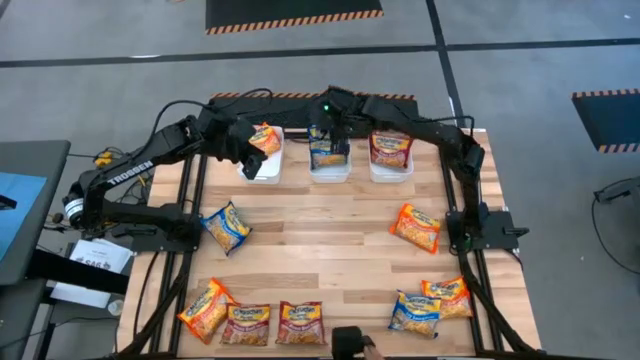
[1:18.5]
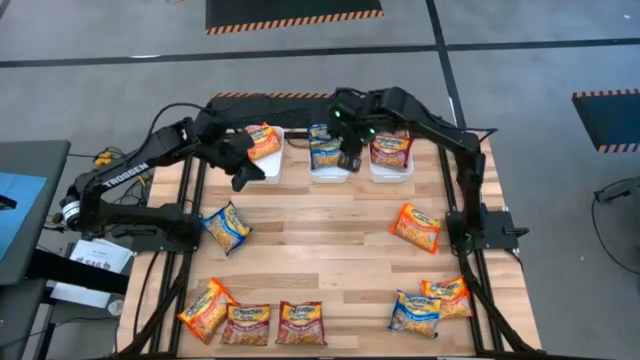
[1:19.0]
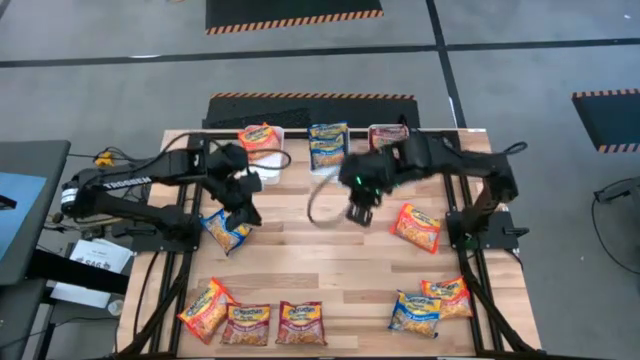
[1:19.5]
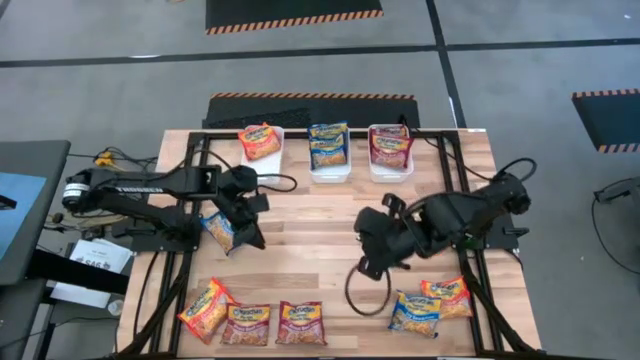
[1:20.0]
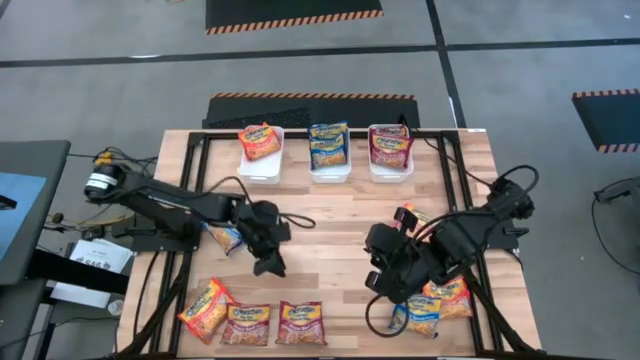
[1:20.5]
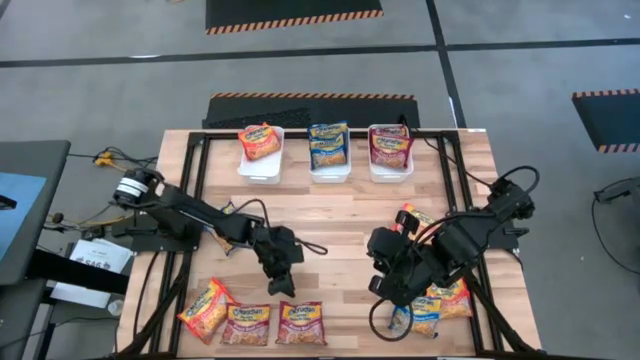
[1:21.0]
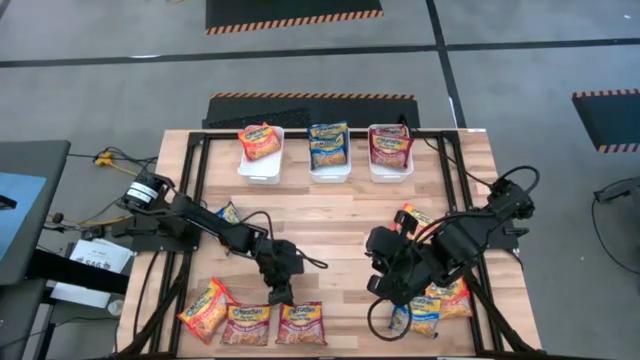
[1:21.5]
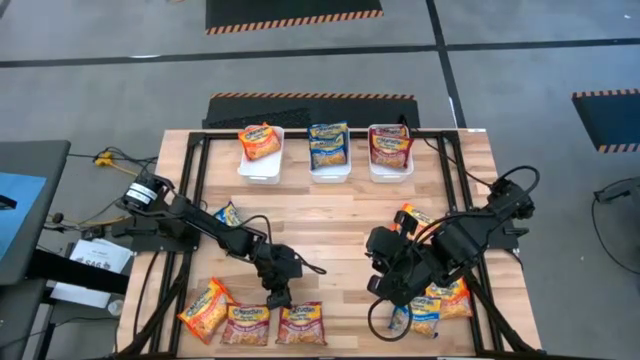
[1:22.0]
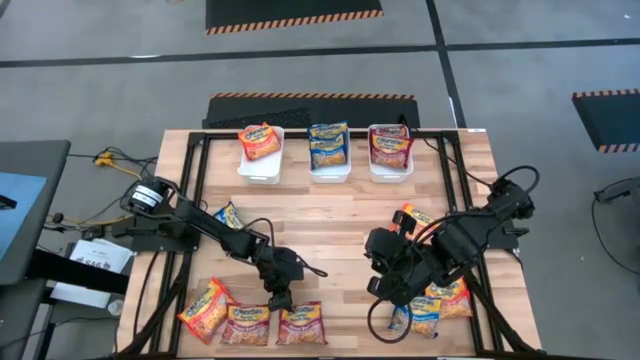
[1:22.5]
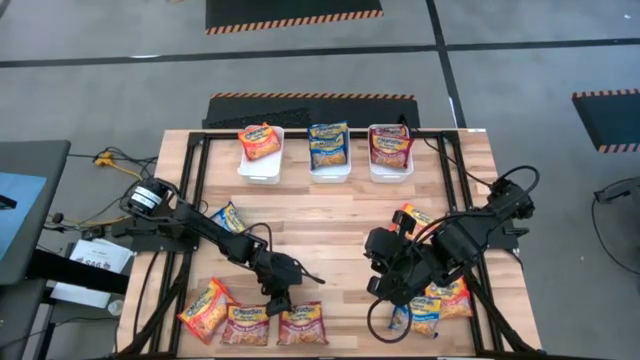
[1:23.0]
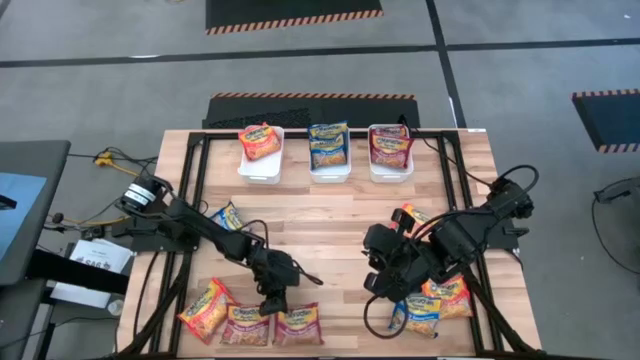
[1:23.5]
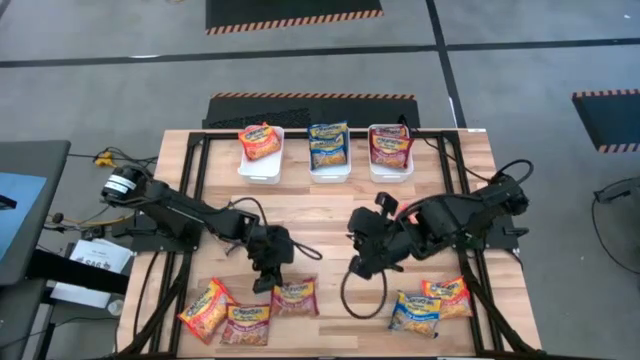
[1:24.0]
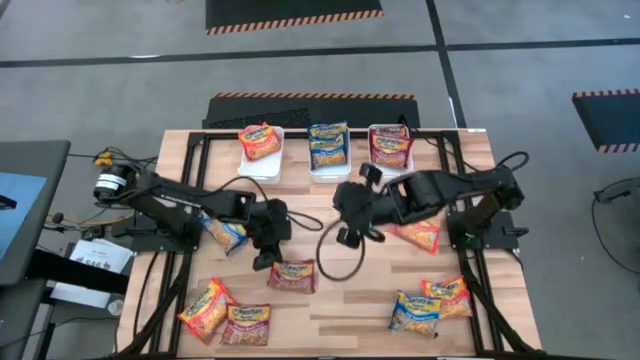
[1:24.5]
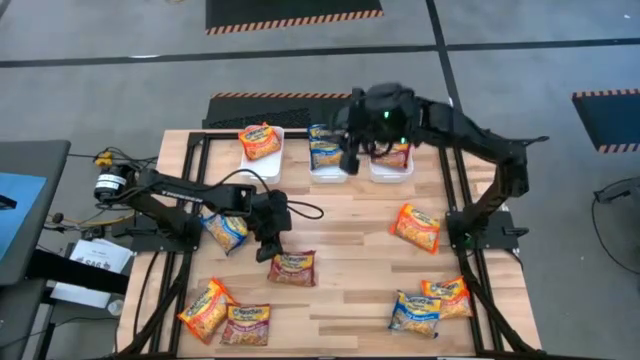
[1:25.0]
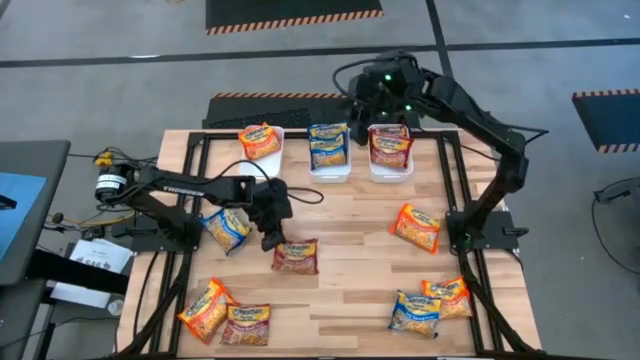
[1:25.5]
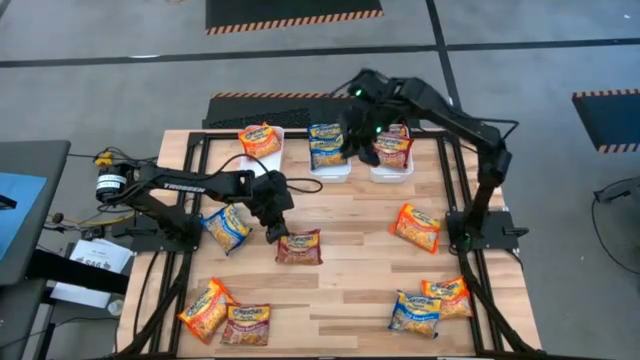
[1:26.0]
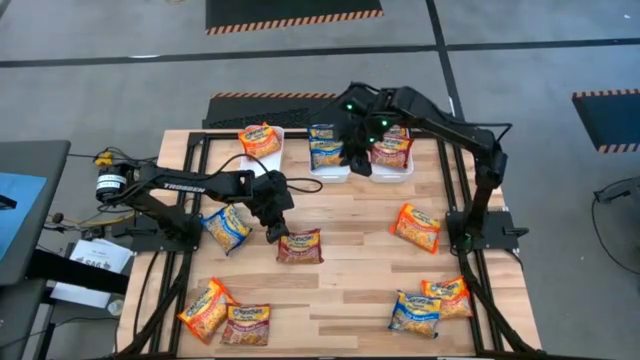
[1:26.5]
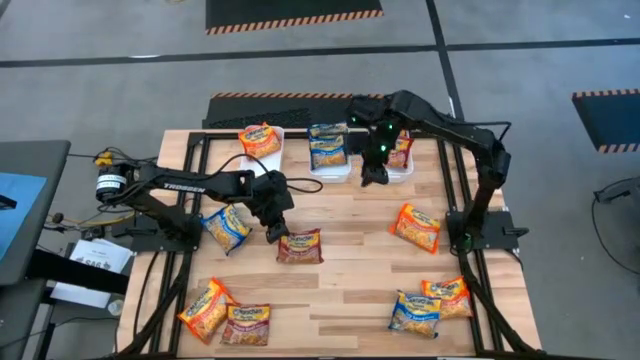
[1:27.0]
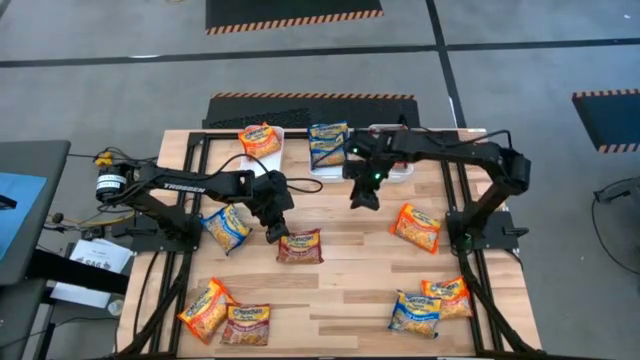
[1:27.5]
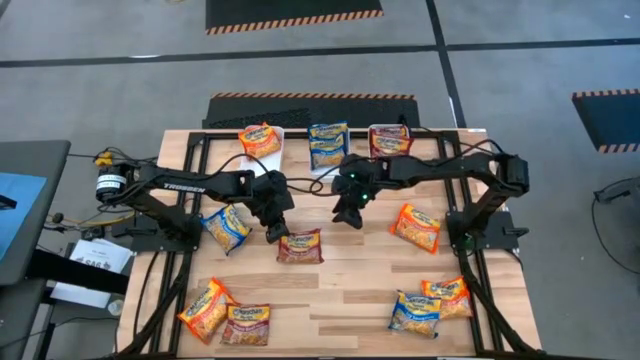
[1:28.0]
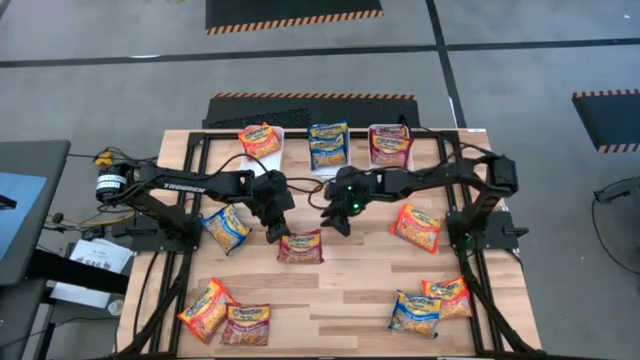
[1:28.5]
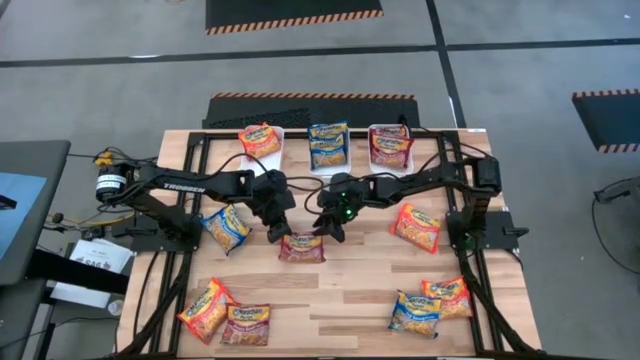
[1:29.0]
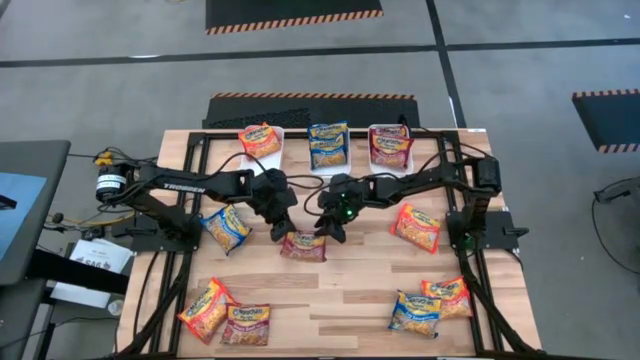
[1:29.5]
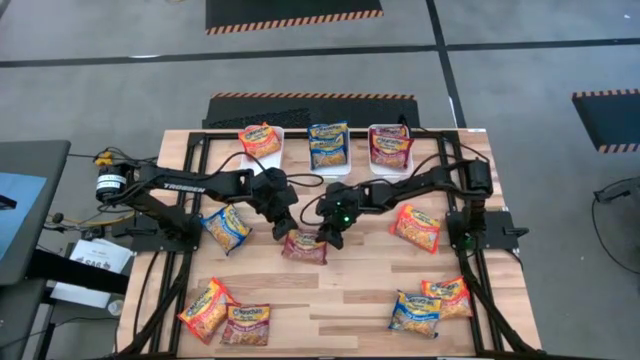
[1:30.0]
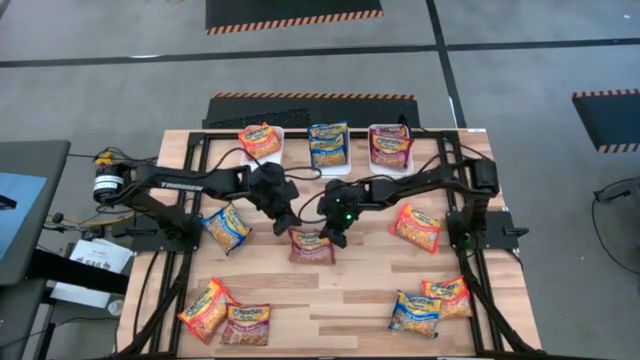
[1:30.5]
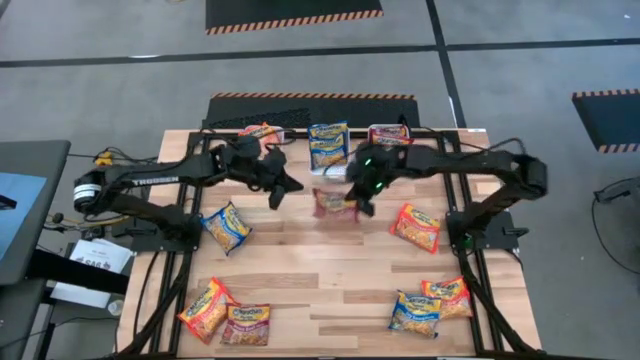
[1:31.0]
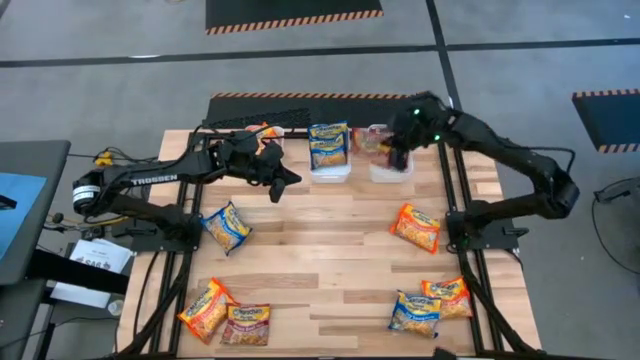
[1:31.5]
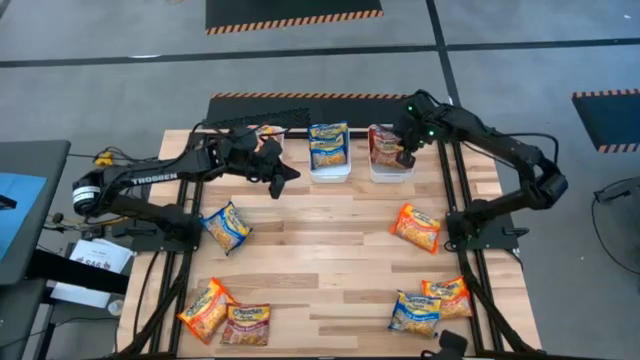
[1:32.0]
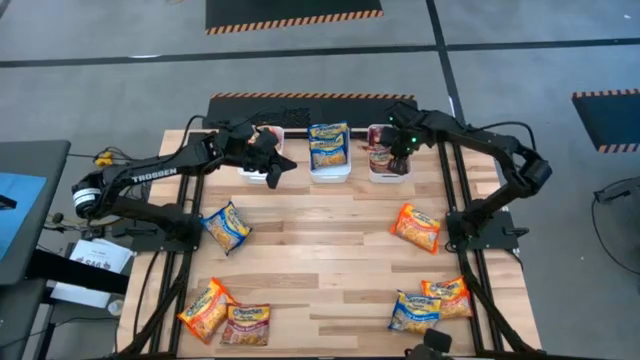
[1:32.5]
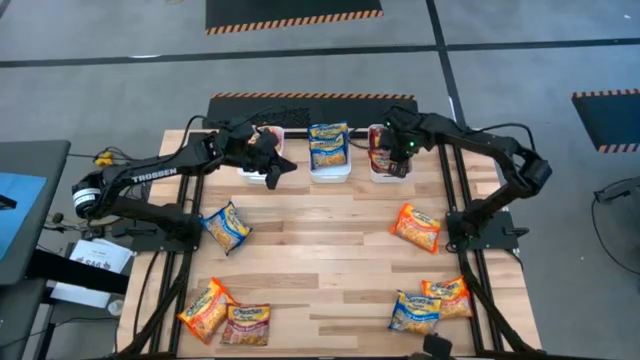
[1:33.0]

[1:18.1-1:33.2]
Task: Sort Maruchan noodles
Put the red noodle pack into the right white bin

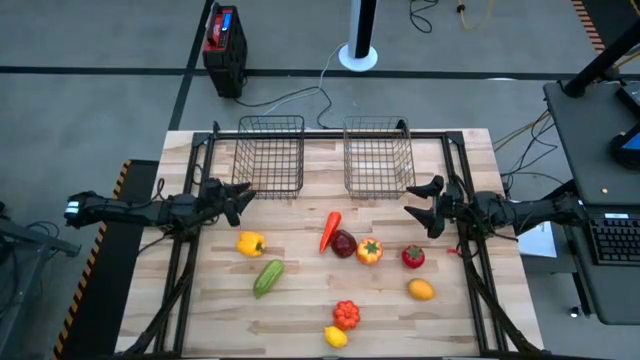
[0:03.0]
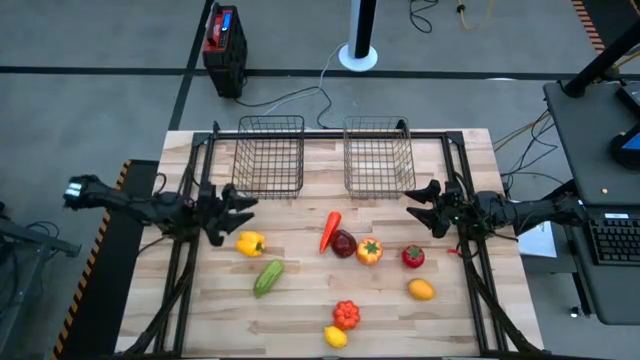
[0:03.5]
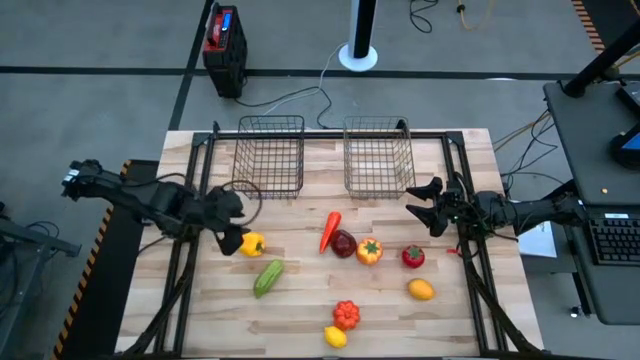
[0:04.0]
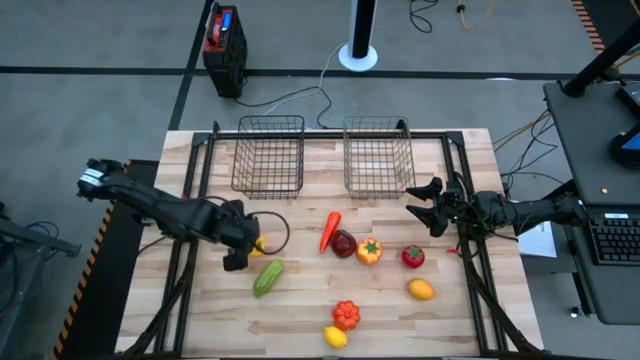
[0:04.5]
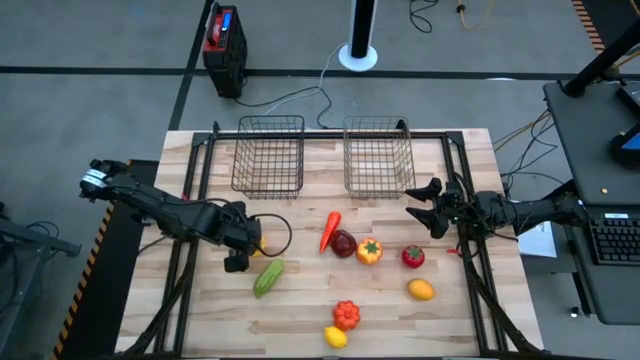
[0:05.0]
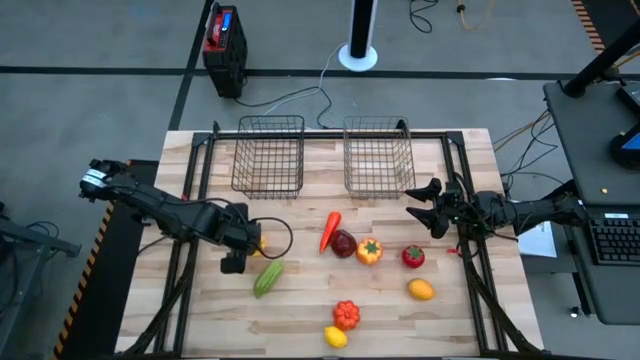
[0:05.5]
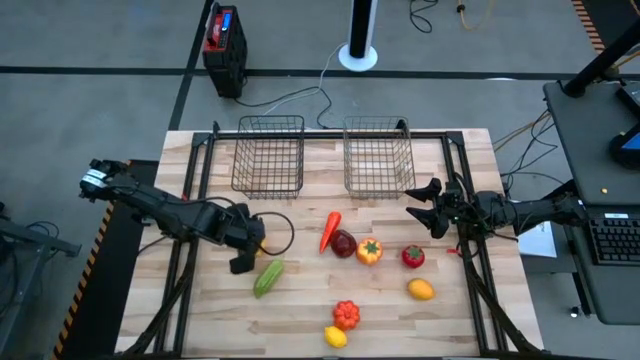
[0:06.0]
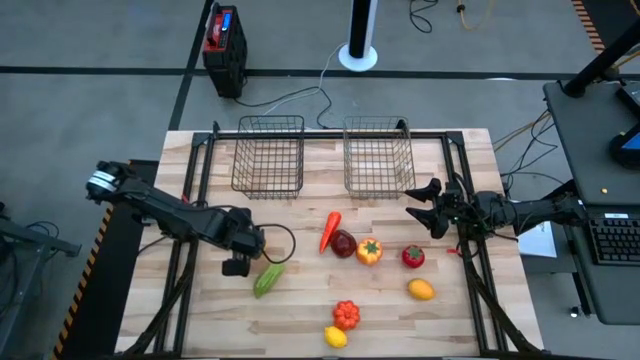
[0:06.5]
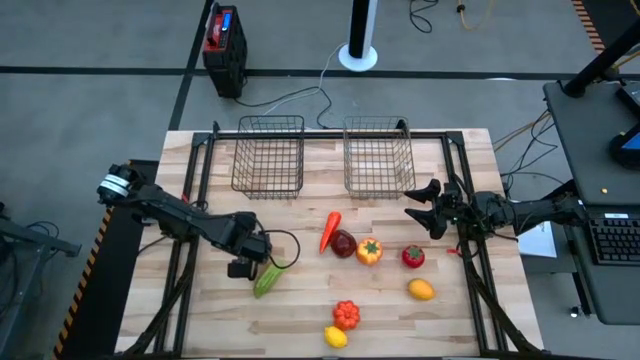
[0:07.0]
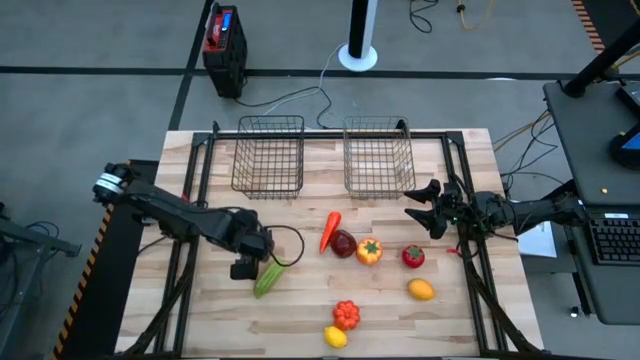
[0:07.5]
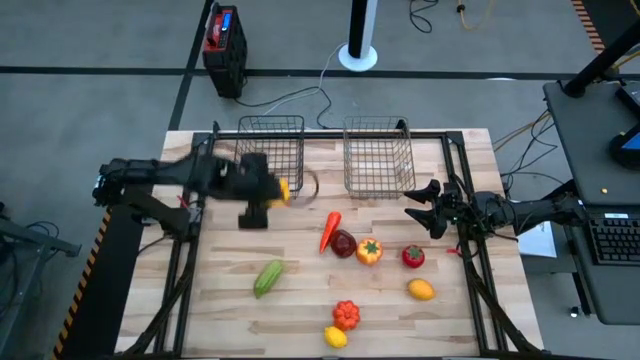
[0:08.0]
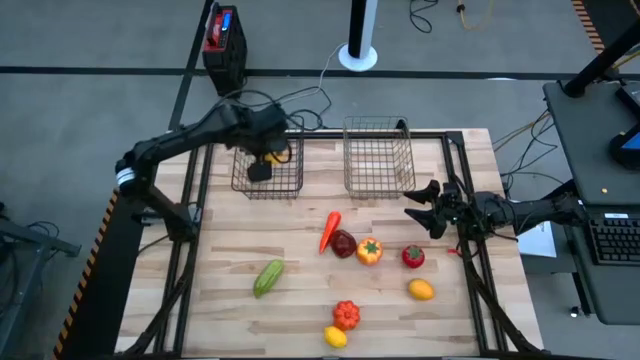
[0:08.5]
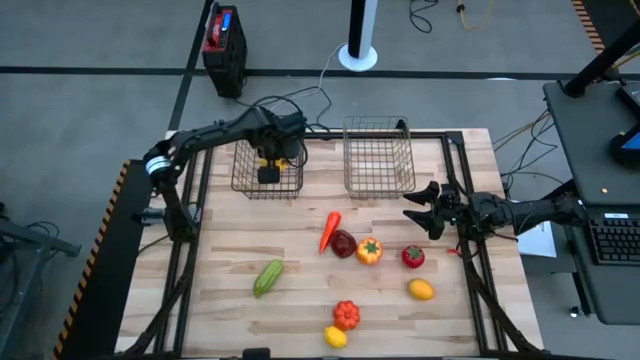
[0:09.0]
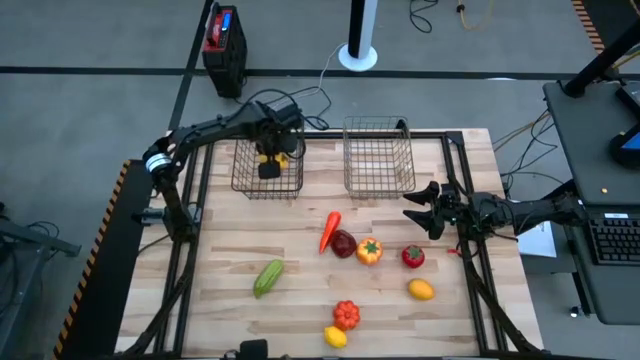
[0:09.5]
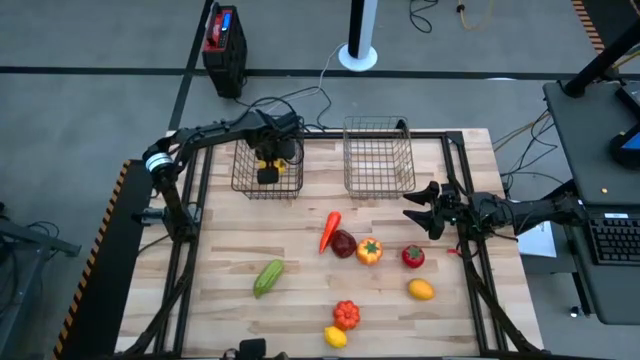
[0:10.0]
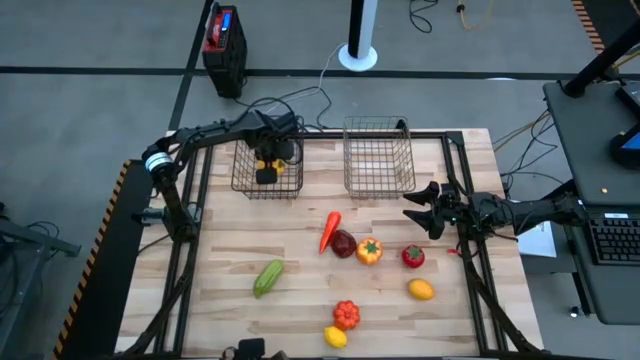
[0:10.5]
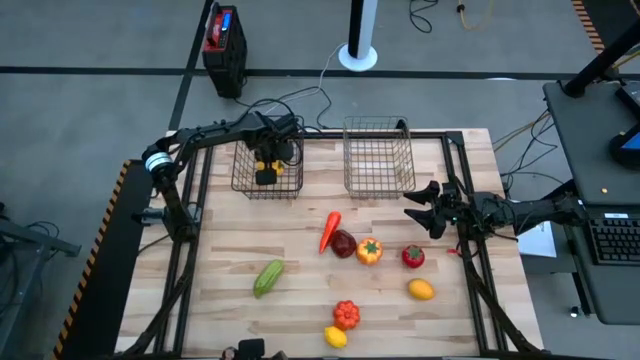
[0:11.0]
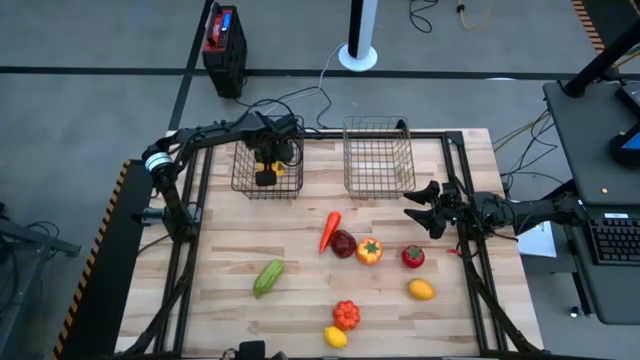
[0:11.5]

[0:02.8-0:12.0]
Task: Sort produce into baskets
Put the yellow bill pepper into the black wire basket
